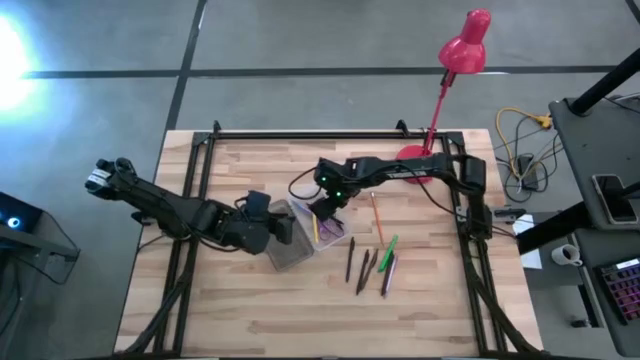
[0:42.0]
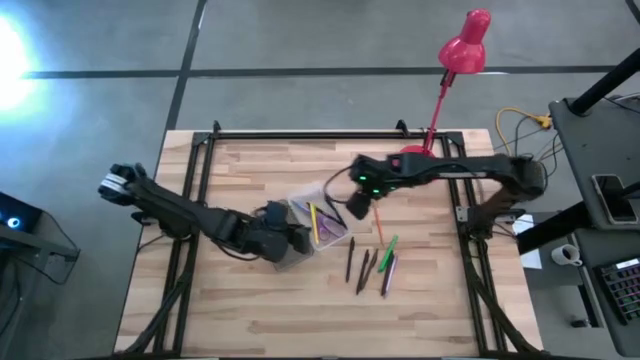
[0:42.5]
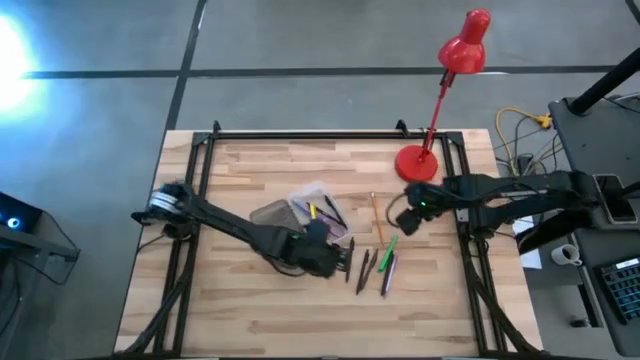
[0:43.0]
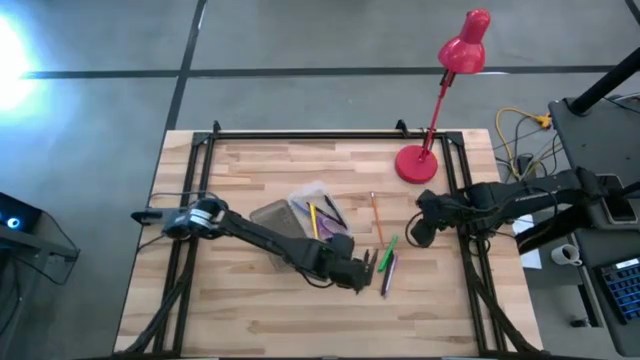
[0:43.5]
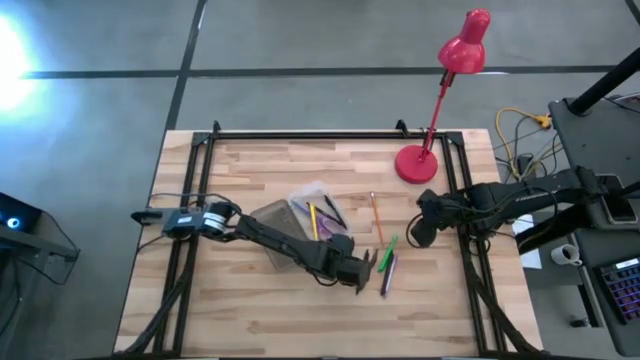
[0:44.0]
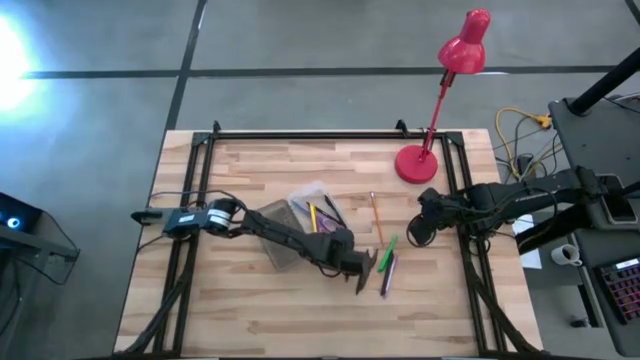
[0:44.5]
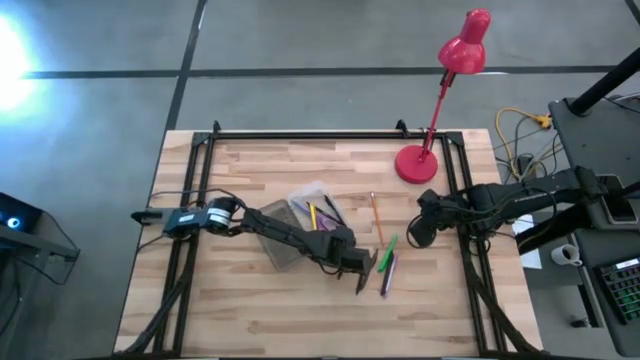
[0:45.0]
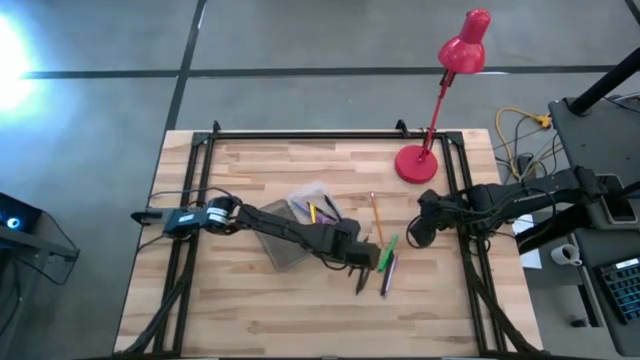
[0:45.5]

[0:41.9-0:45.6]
Task: Pick & place school supplies into a supply box
Put the yellow pencil into the gray supply box

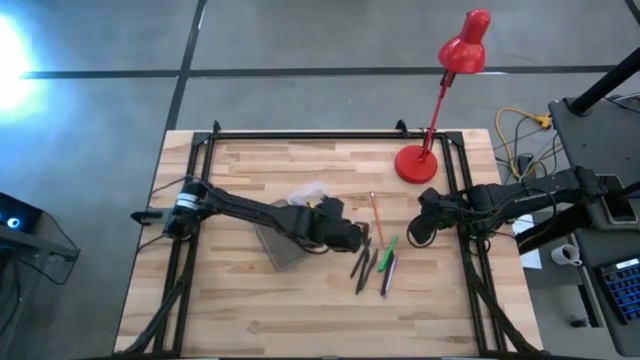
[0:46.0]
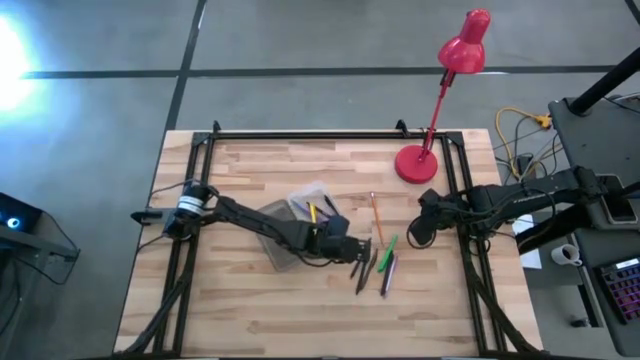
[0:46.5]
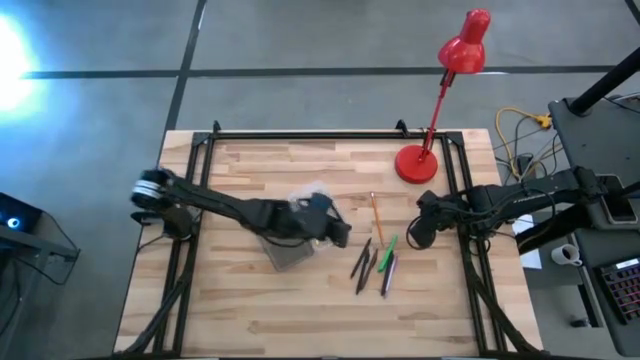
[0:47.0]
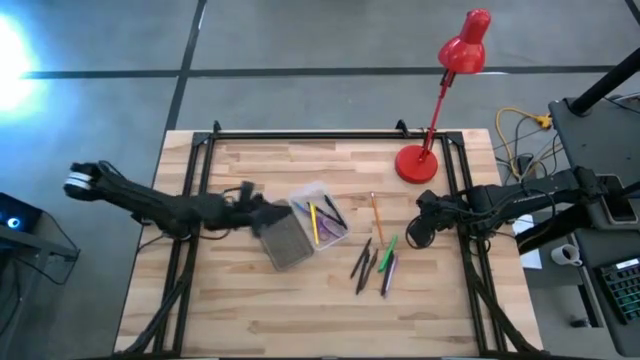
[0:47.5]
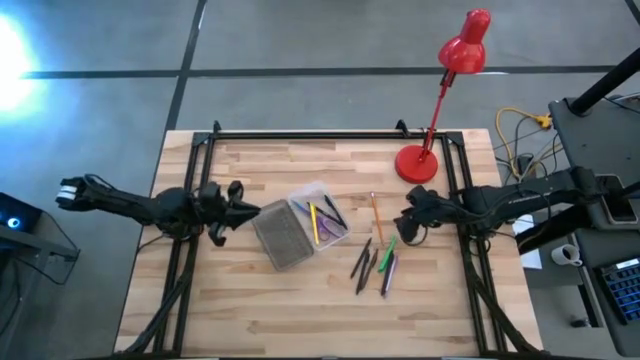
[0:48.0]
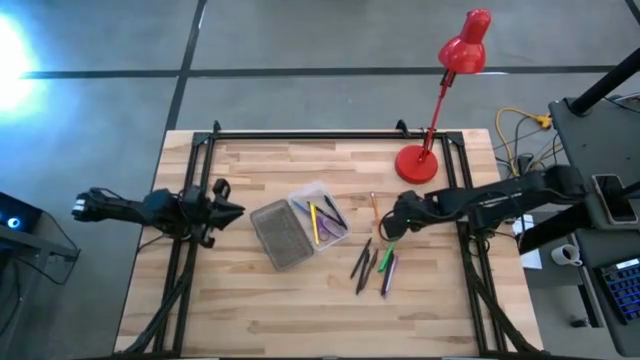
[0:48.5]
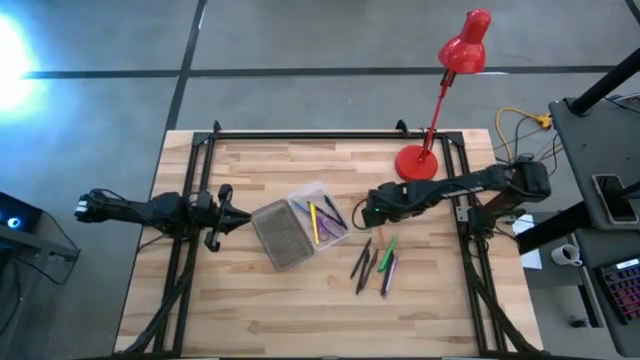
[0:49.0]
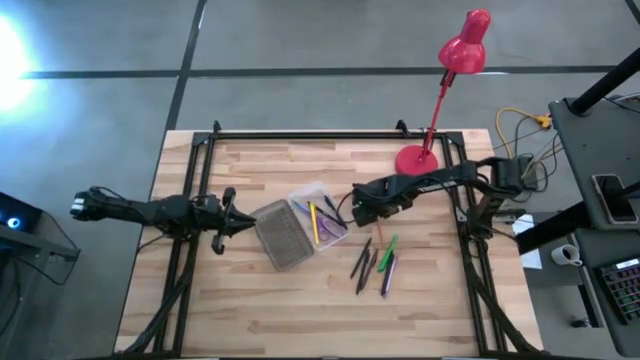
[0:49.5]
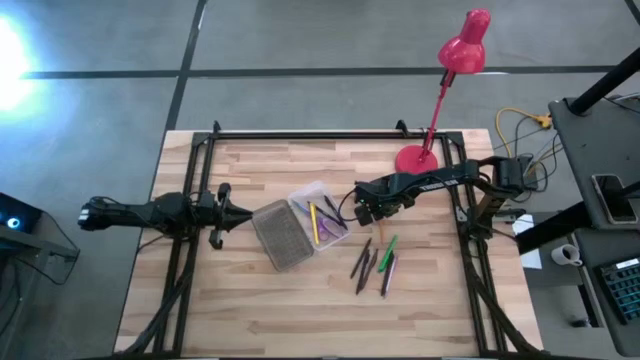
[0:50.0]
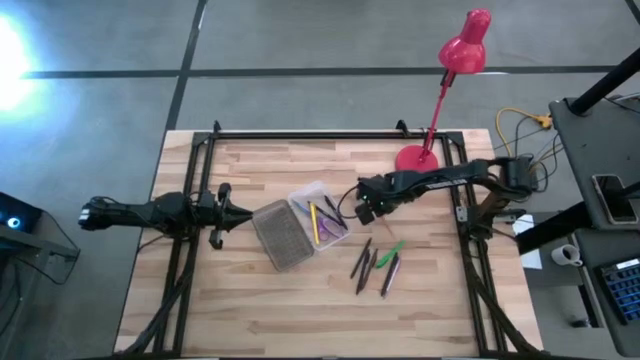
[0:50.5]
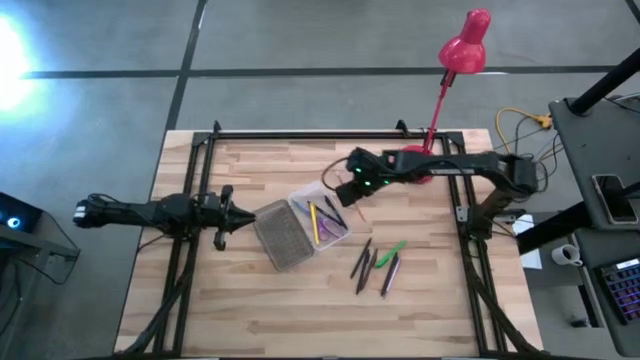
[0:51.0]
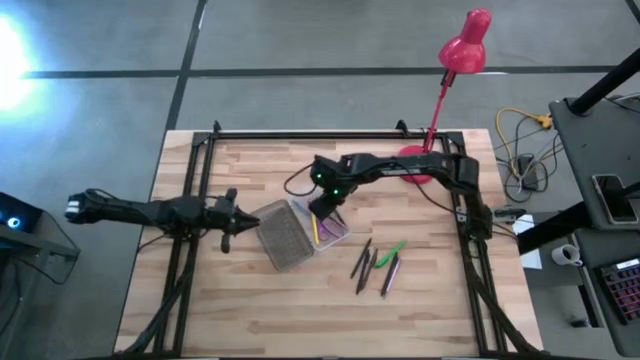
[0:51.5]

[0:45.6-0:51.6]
Put the yellow pencil into the gray supply box

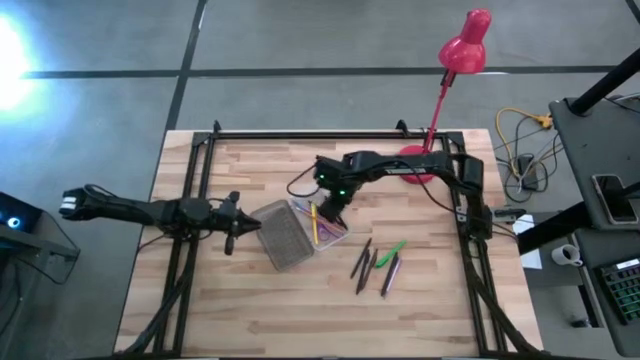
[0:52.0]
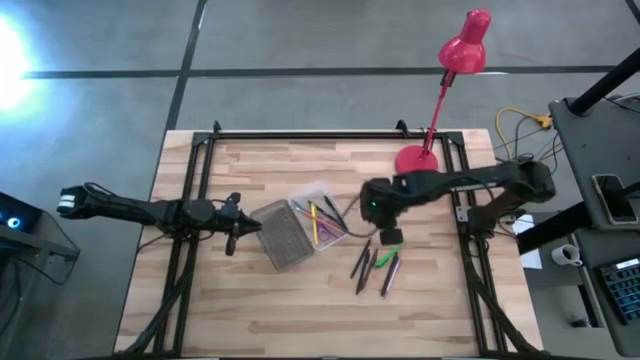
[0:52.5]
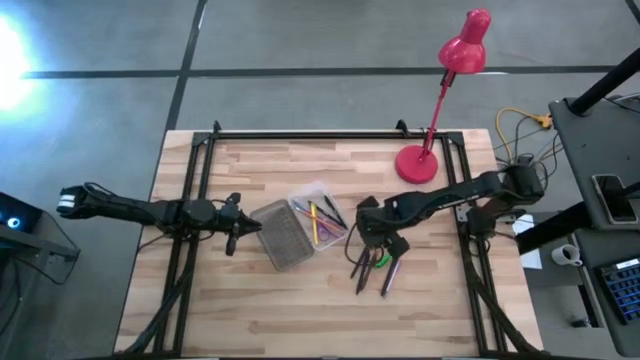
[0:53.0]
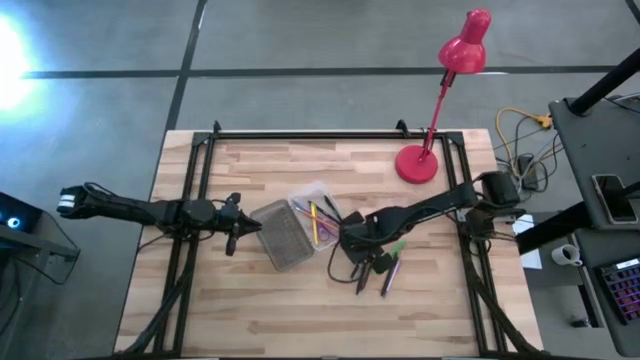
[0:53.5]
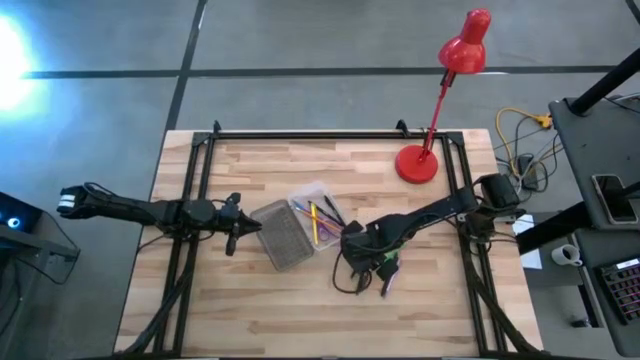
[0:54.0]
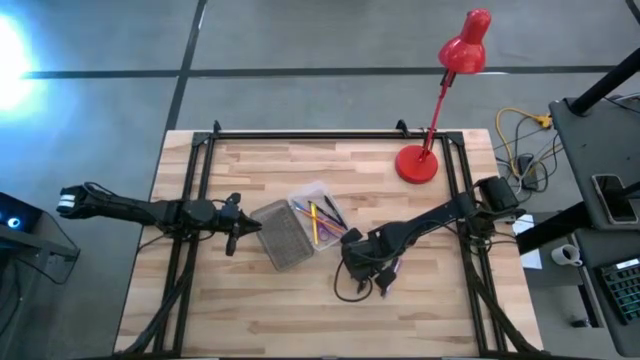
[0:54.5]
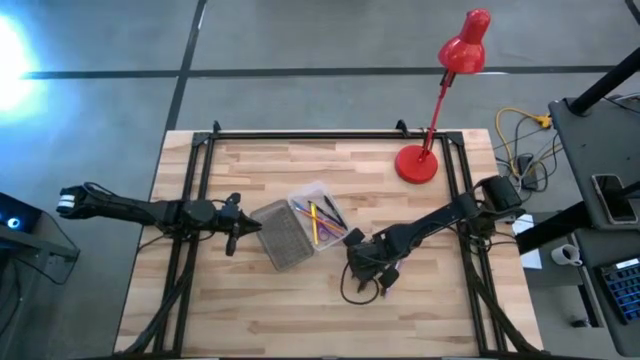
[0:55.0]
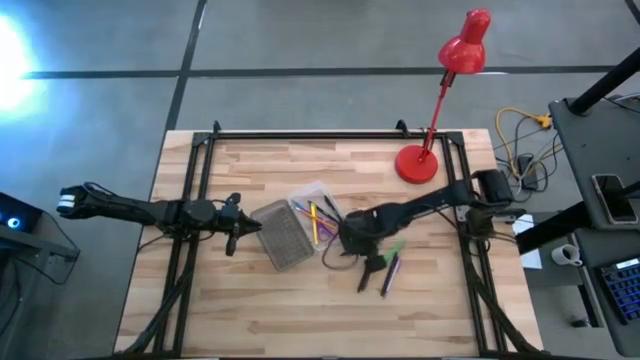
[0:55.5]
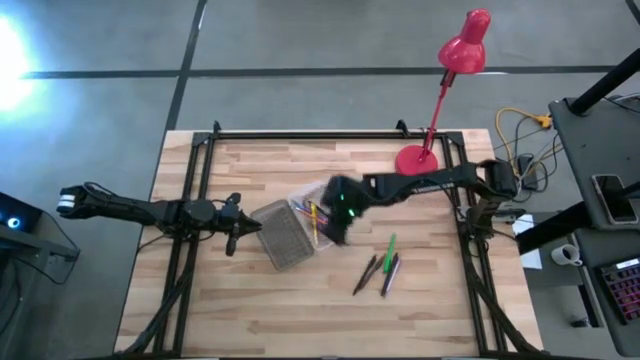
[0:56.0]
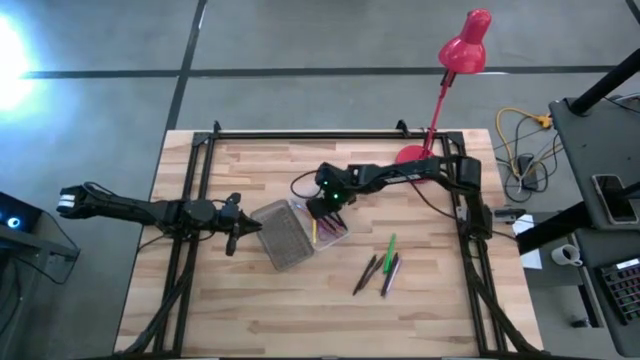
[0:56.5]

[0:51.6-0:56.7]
Put the black pen into the gray supply box

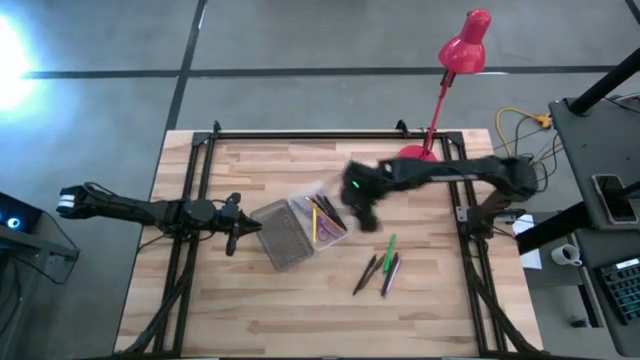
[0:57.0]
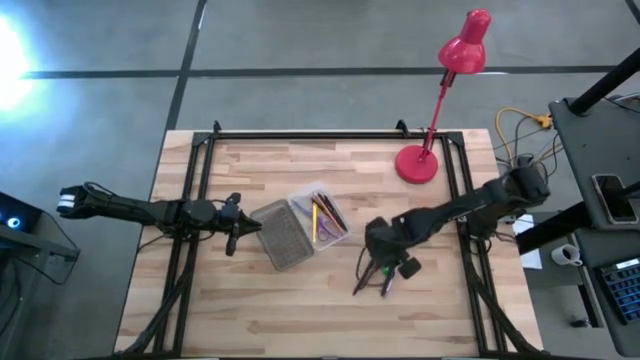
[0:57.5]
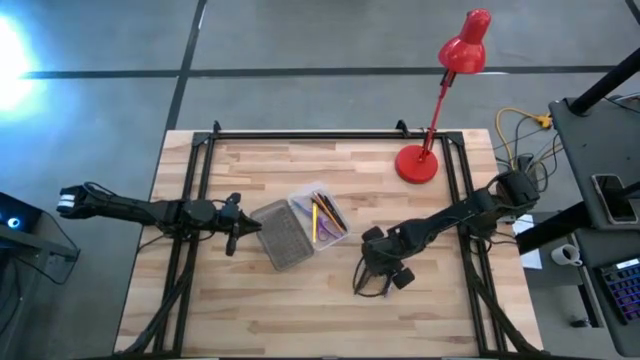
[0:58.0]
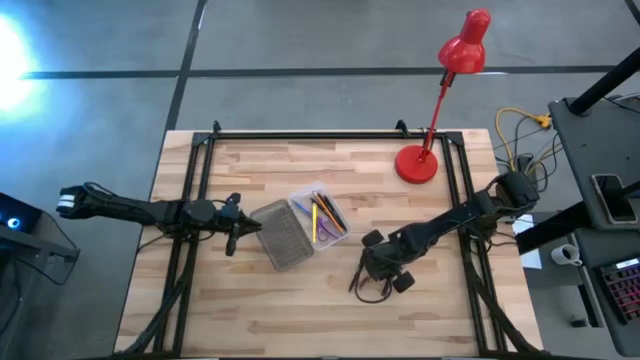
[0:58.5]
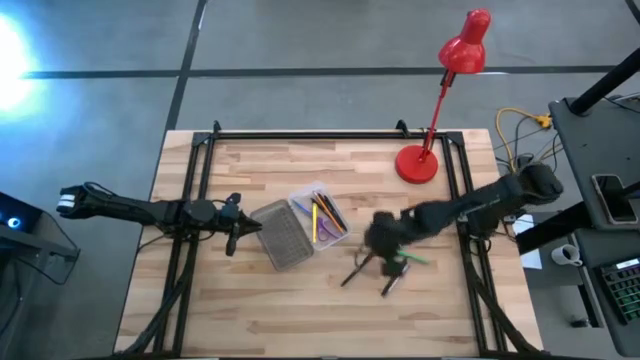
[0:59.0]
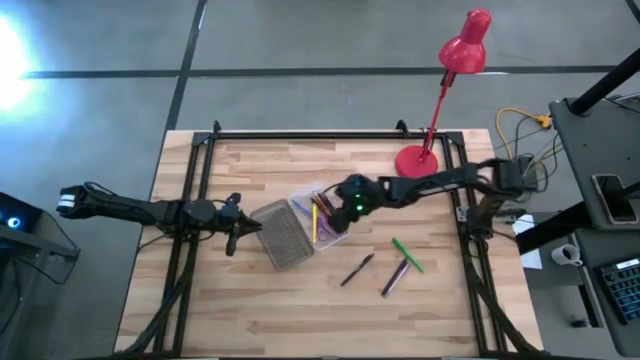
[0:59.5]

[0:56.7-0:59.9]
Put the brown pen into the gray supply box

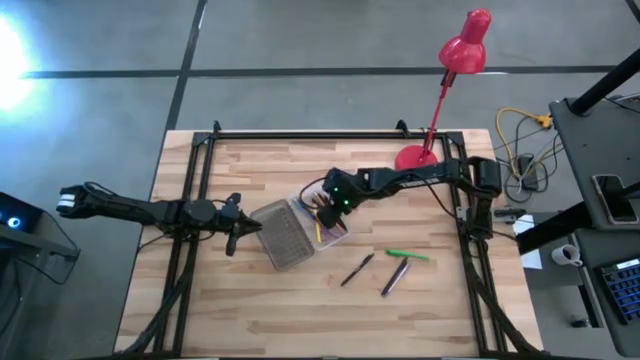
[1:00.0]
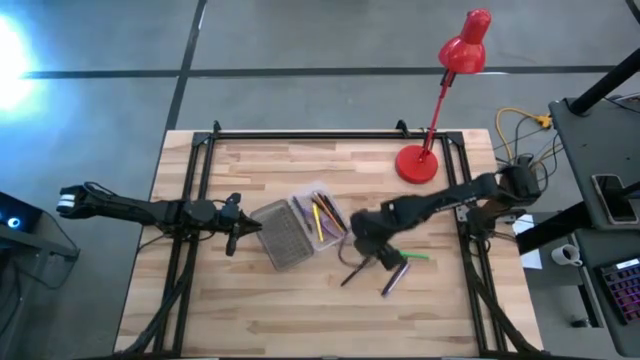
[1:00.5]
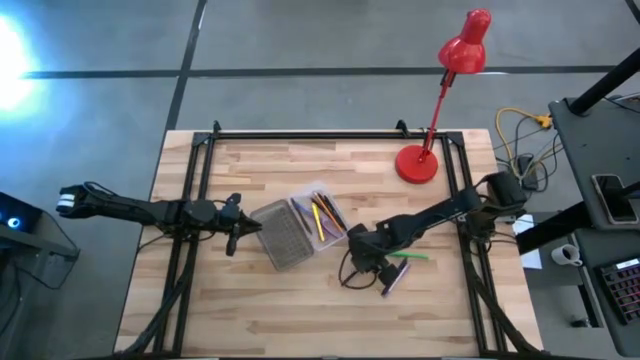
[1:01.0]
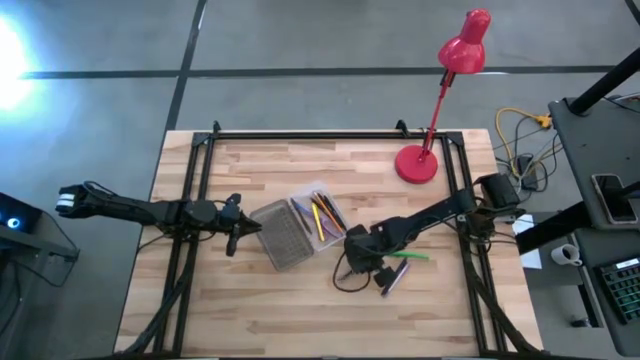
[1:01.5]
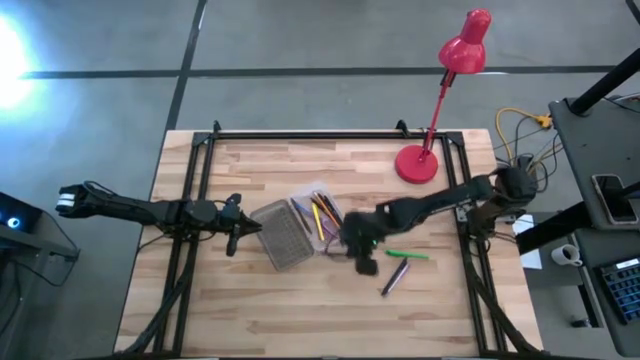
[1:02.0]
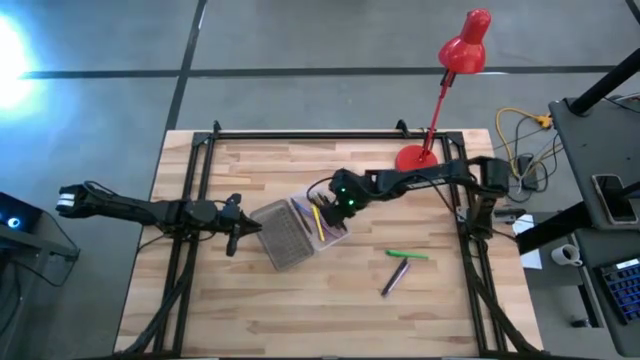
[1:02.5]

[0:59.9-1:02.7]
Put the black pen into the gray supply box
